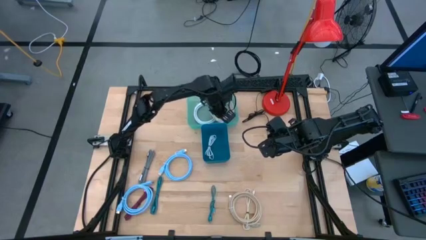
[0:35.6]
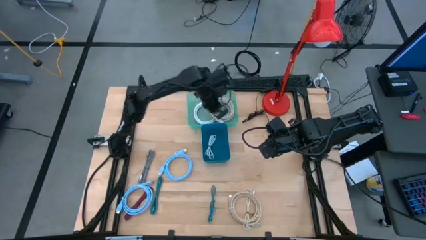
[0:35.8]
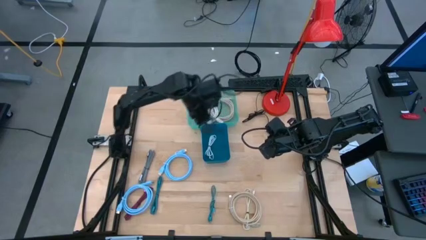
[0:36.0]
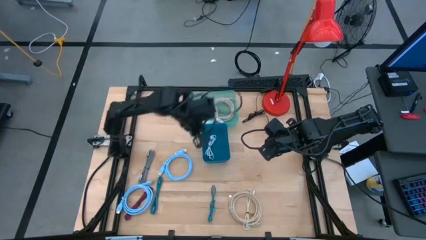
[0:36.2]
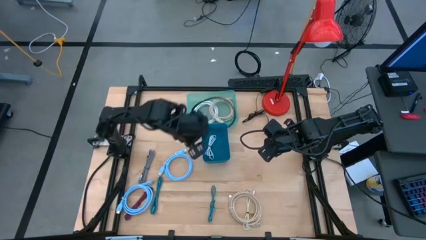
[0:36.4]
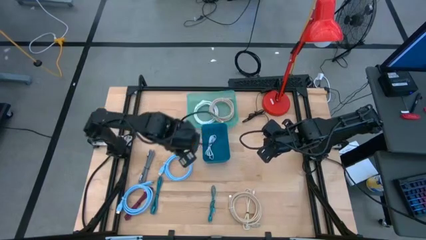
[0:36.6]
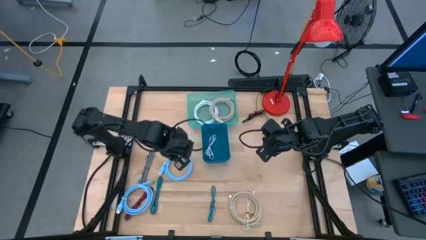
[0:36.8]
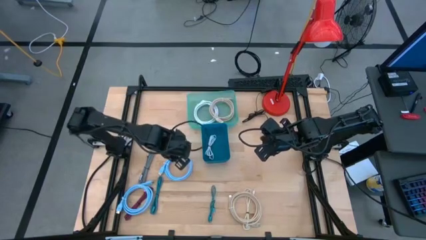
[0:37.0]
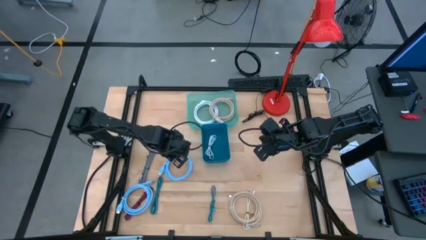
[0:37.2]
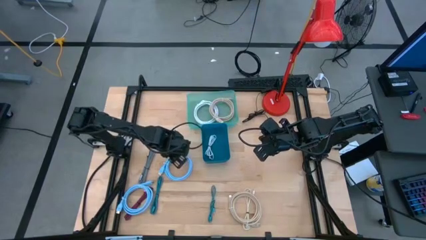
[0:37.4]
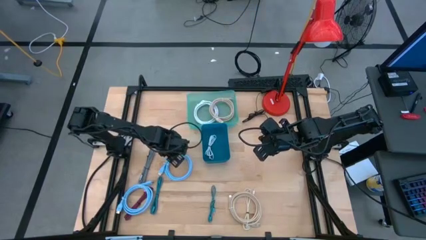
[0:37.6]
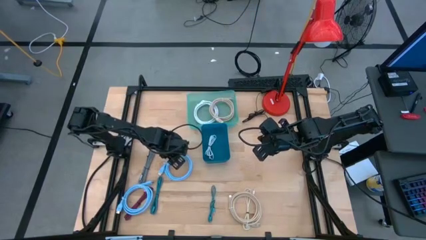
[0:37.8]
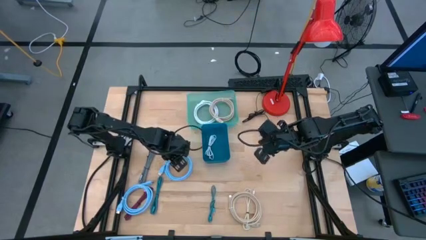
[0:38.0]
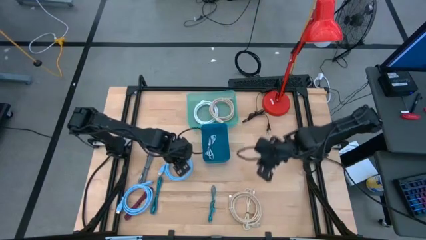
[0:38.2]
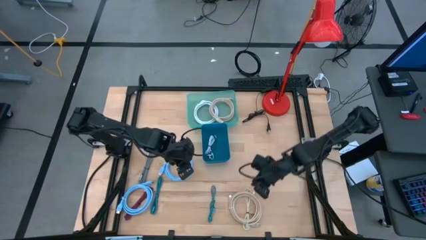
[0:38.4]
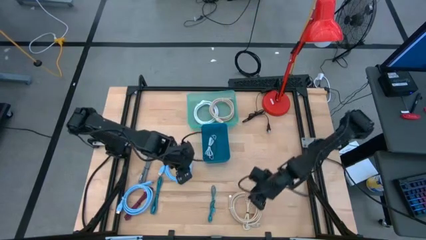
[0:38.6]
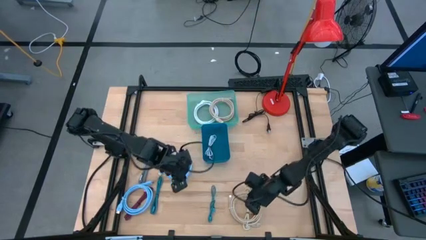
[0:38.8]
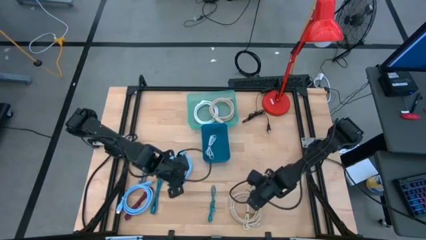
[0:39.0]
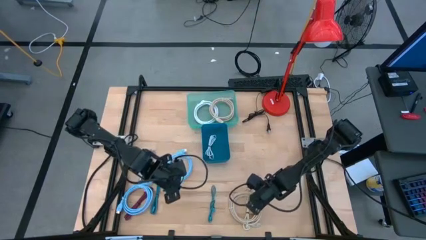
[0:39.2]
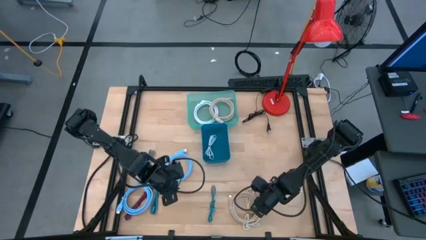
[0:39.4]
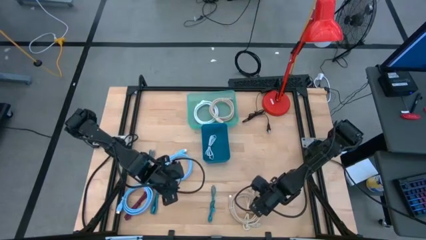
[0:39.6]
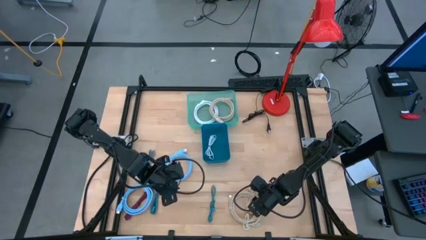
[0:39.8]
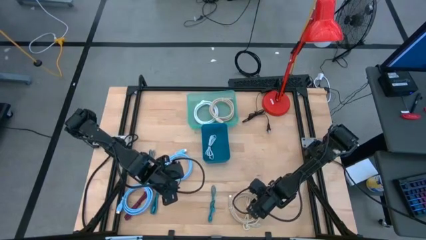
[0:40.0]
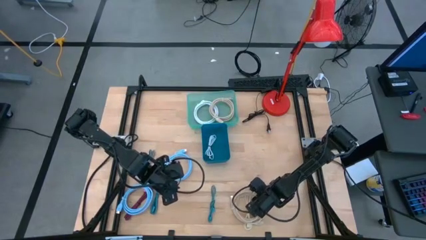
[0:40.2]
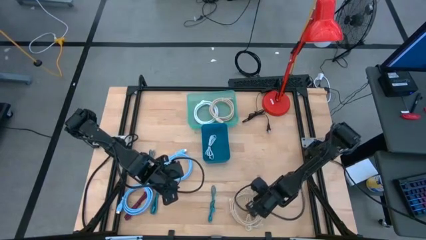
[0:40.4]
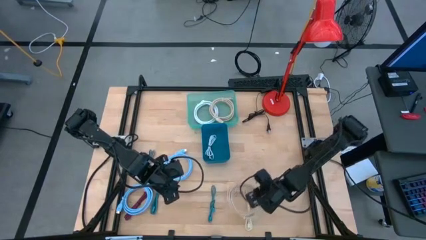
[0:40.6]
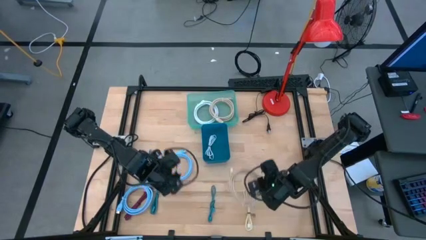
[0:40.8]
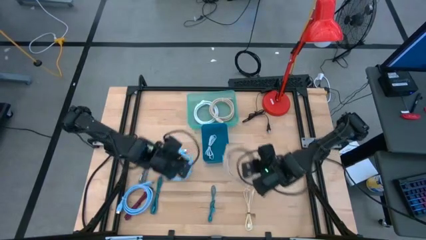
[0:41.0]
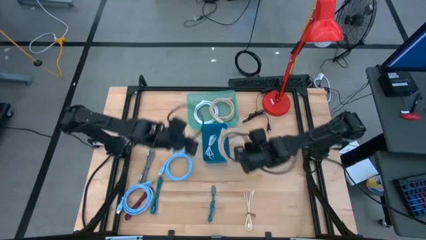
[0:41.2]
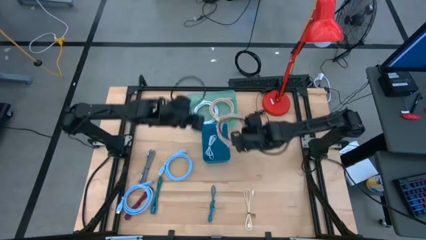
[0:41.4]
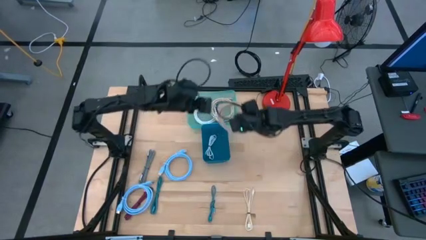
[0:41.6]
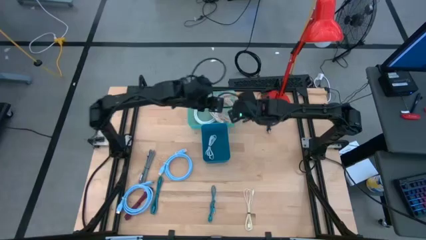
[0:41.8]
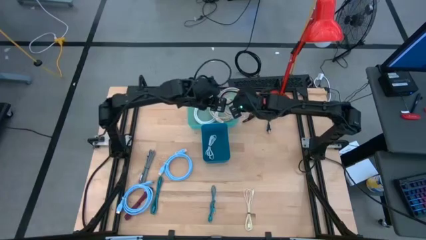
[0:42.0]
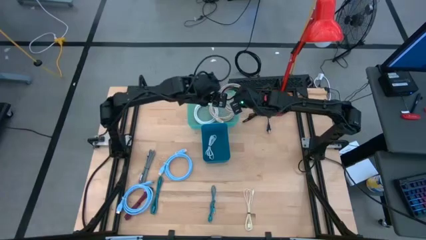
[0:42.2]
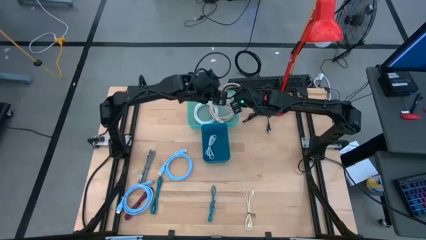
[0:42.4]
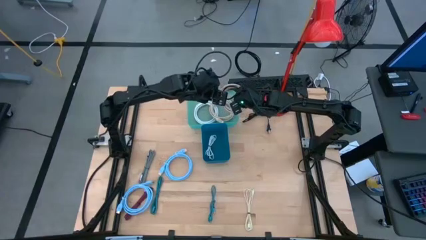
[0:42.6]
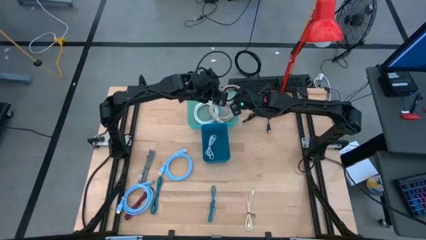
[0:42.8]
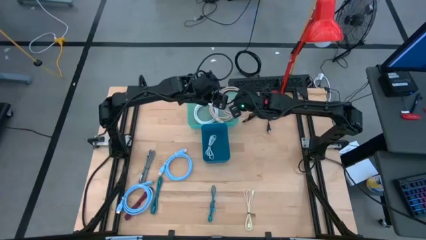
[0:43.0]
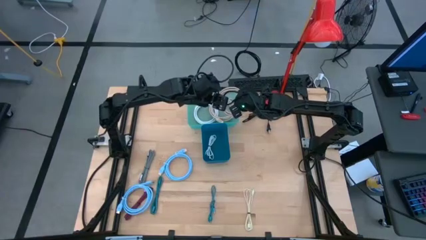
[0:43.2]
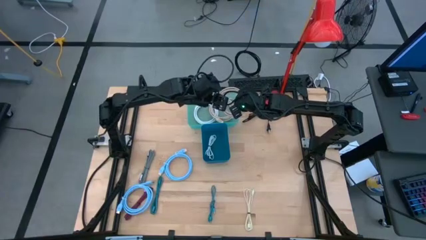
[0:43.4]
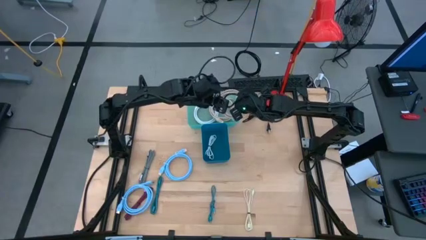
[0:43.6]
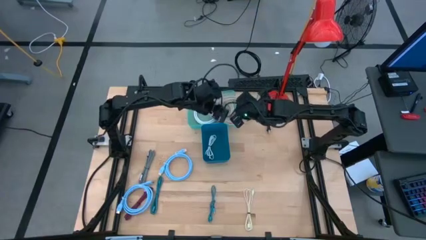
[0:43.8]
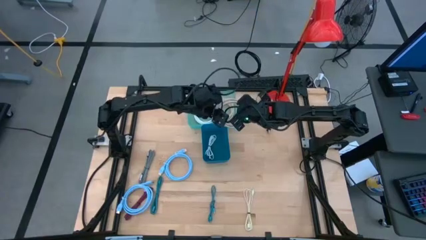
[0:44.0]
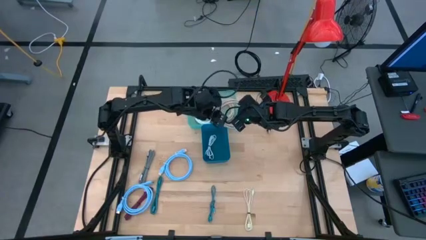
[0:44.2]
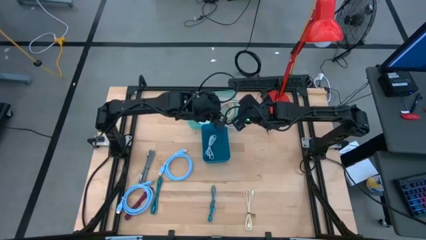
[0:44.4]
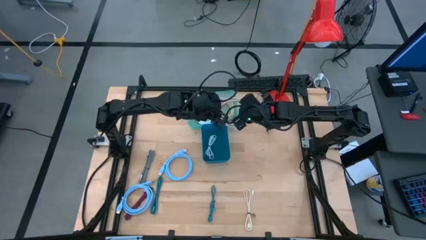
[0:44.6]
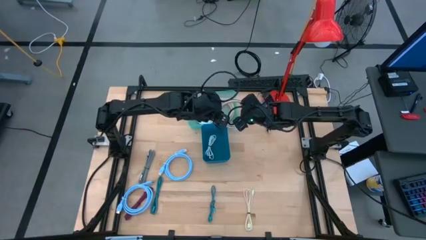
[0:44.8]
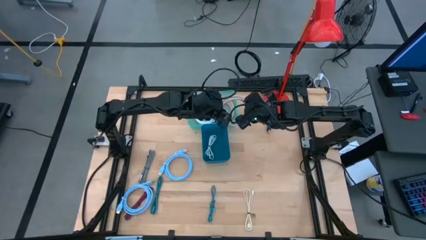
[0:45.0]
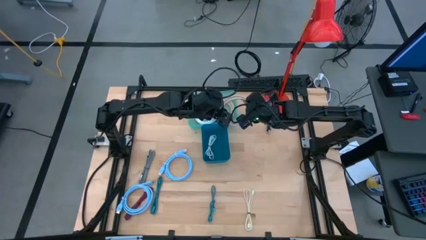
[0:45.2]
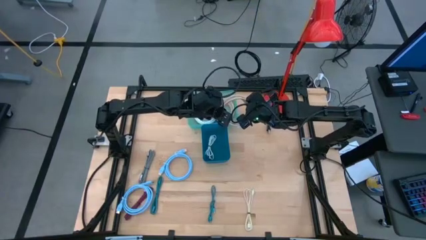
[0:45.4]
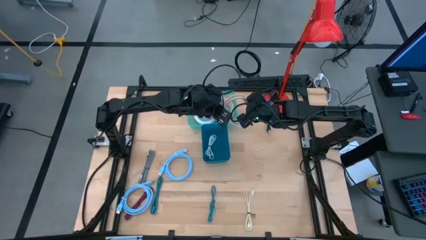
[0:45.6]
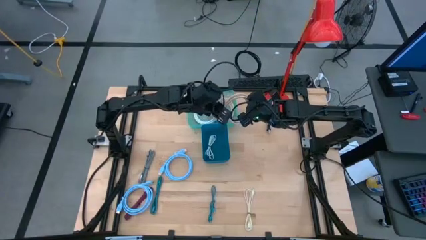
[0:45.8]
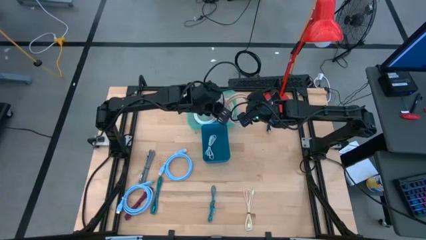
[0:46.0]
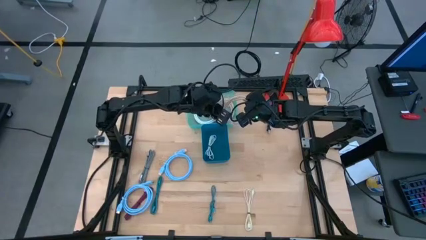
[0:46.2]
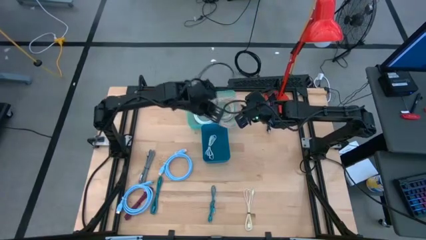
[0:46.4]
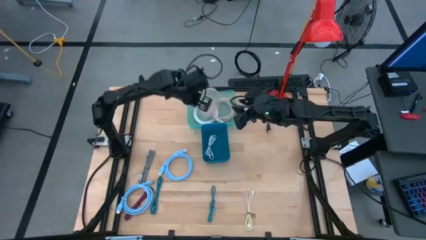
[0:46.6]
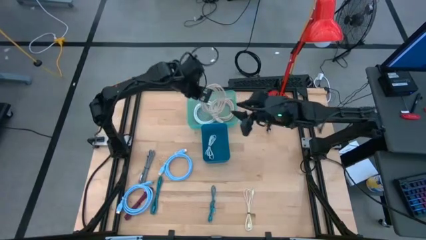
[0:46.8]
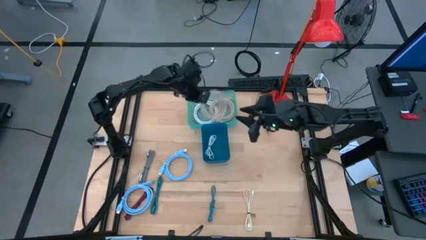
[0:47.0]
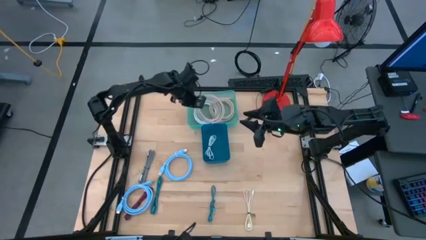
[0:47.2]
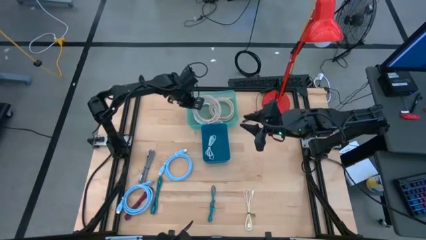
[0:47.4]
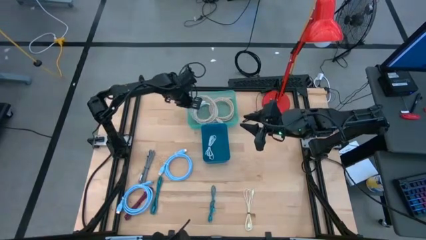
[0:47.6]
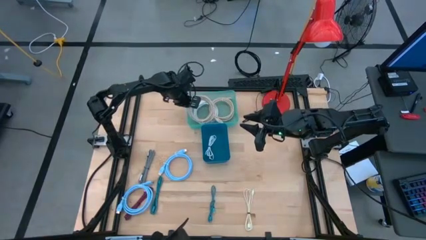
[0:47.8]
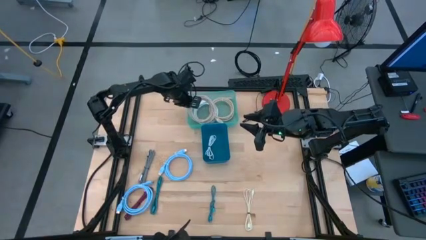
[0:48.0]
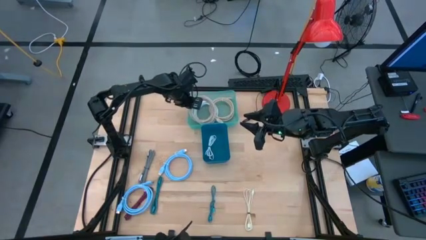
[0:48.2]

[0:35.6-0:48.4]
Task: Pick & Place USB Port
Put the light brown HDMI cable into the green bin

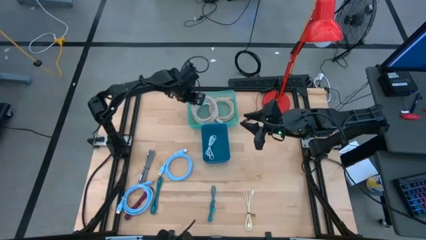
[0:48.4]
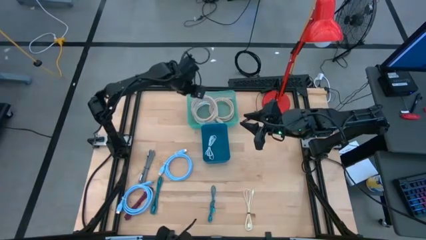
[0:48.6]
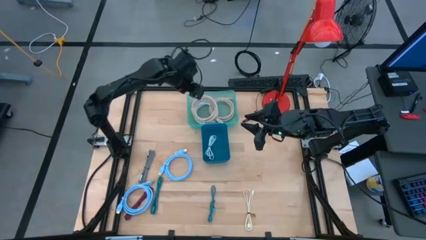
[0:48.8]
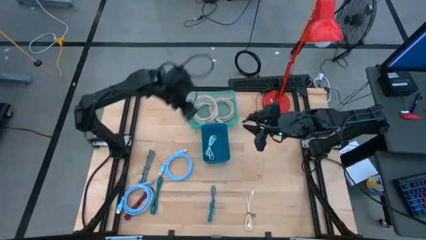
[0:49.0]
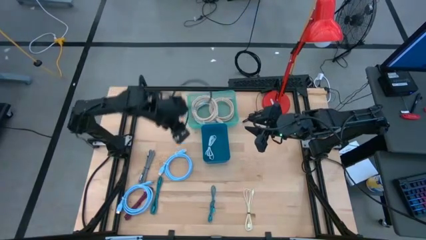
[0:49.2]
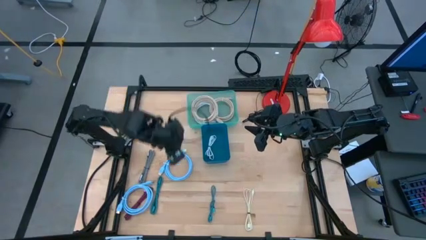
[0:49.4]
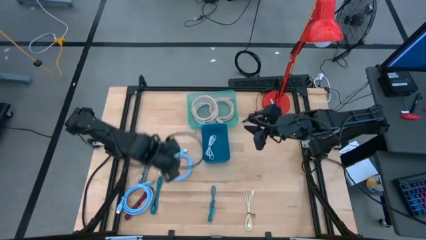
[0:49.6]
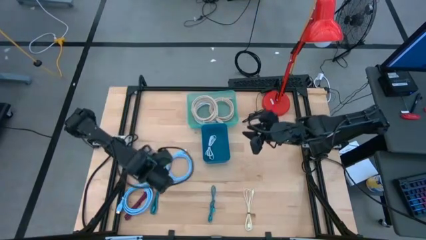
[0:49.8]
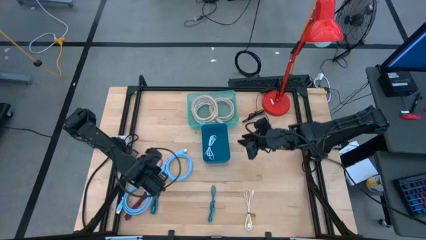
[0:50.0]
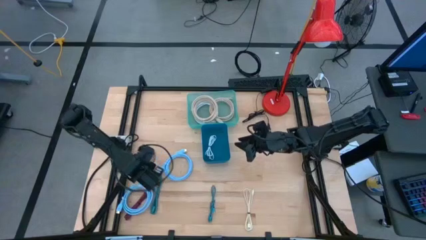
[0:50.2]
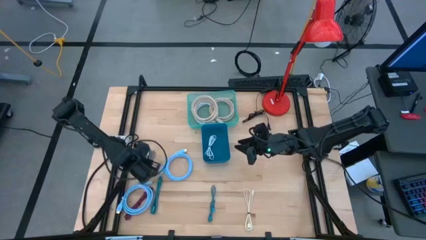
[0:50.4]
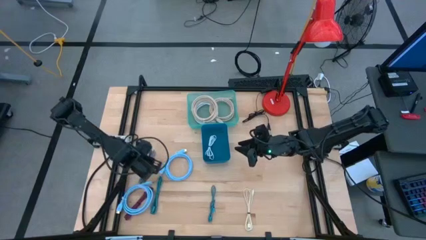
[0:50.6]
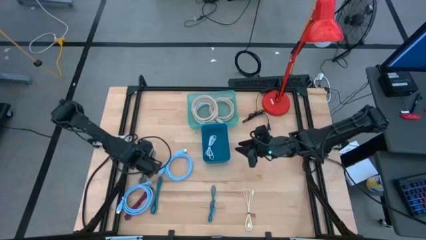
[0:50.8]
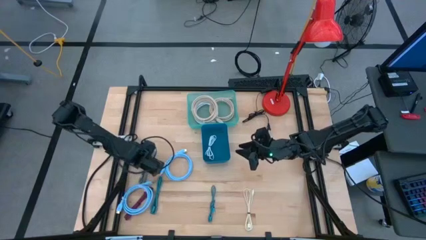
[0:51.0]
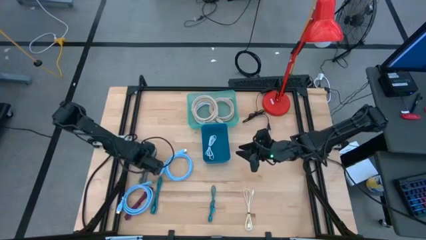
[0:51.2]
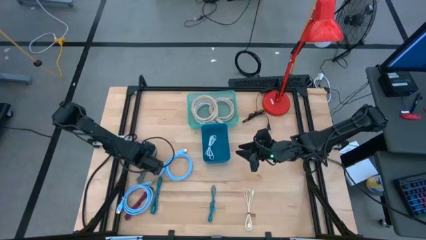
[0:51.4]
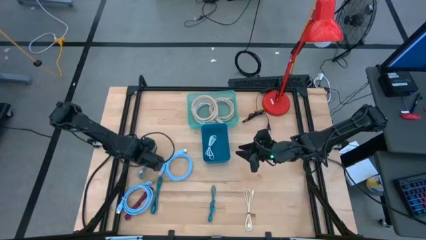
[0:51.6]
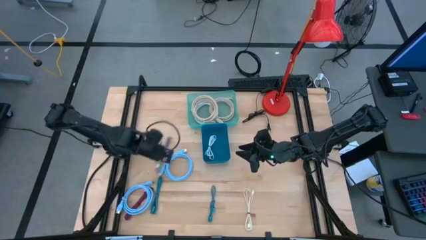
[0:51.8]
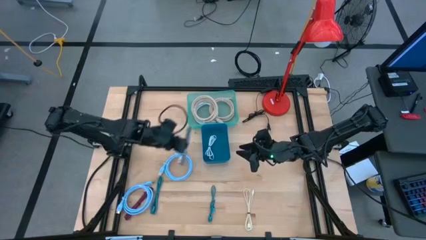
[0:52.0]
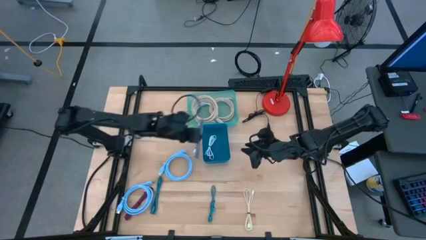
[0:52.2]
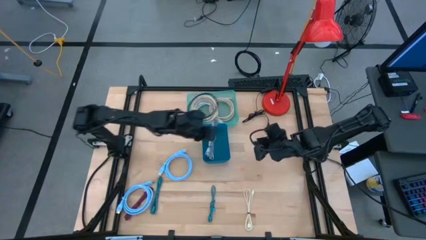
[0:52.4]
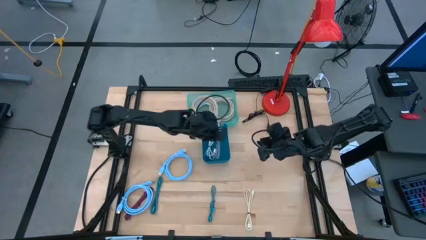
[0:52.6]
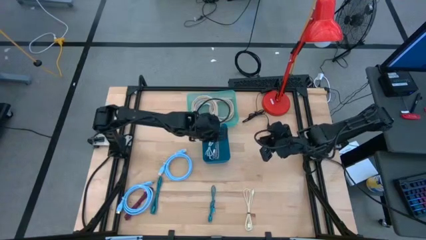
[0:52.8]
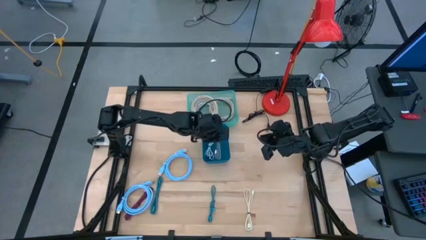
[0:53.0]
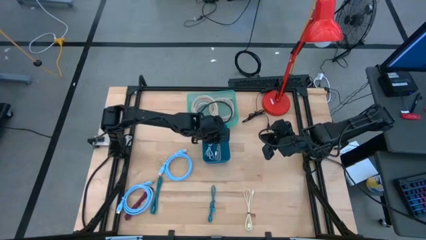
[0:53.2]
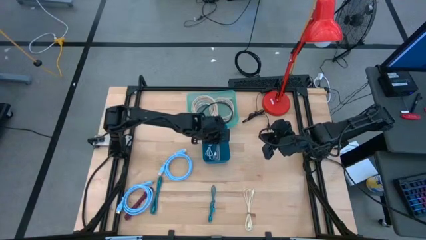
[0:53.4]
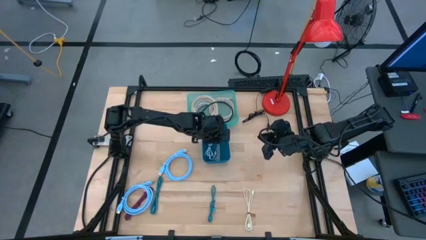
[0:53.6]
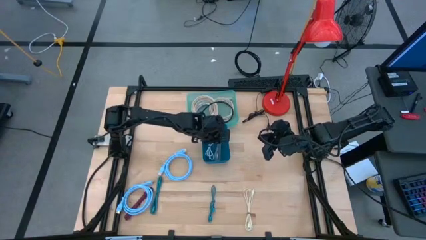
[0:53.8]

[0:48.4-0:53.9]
Put the black and white charger cable into the blue bin
